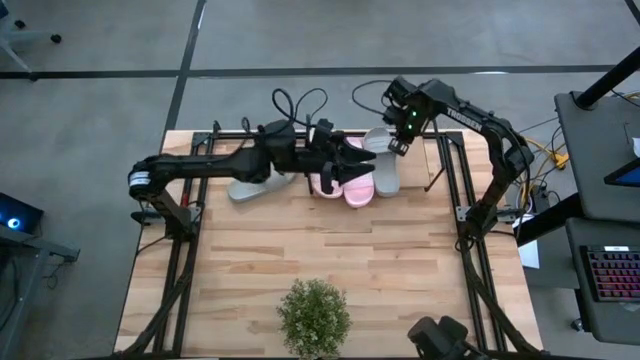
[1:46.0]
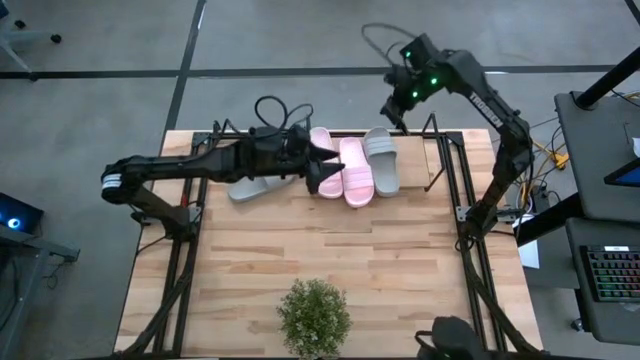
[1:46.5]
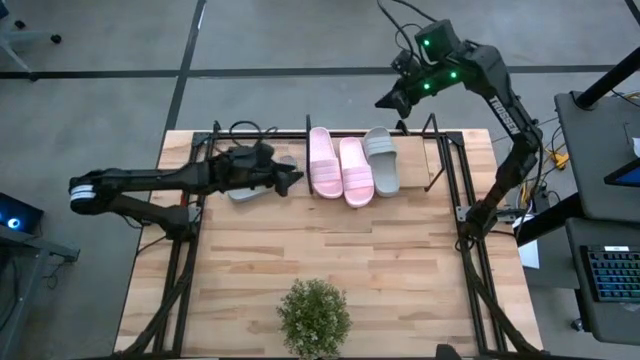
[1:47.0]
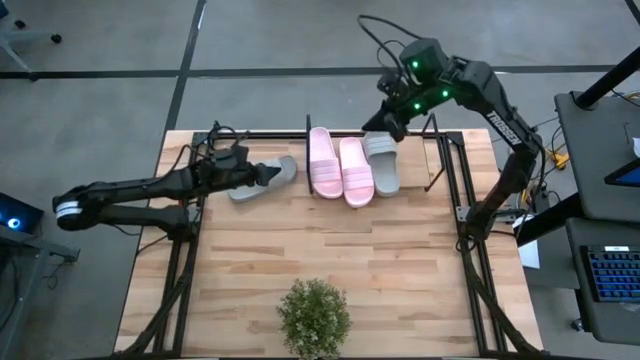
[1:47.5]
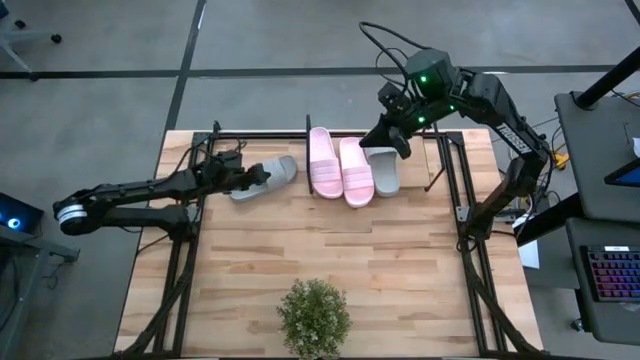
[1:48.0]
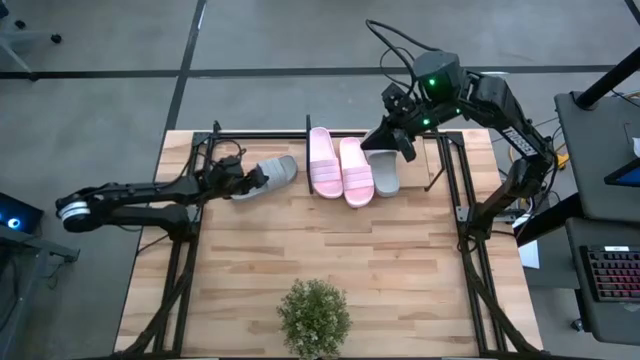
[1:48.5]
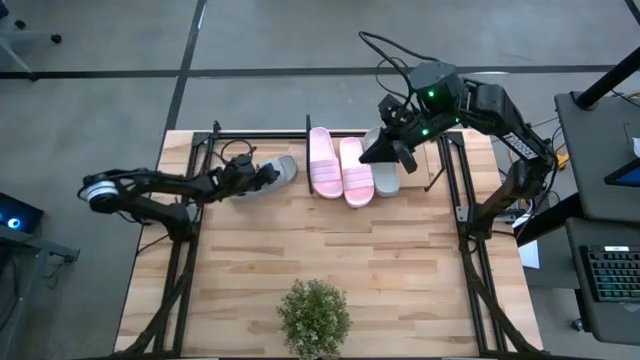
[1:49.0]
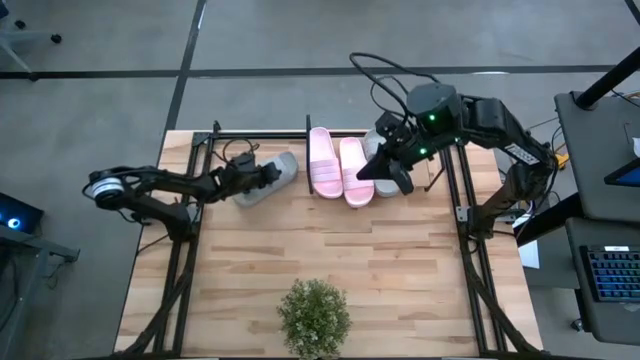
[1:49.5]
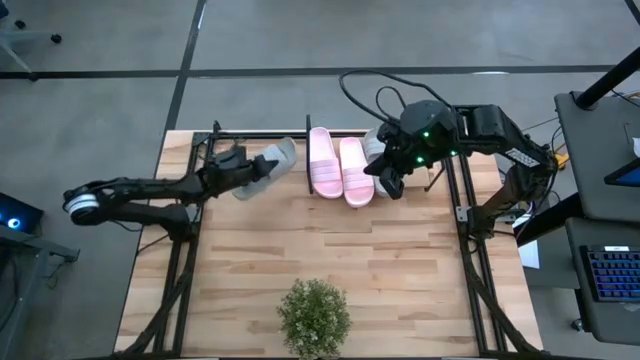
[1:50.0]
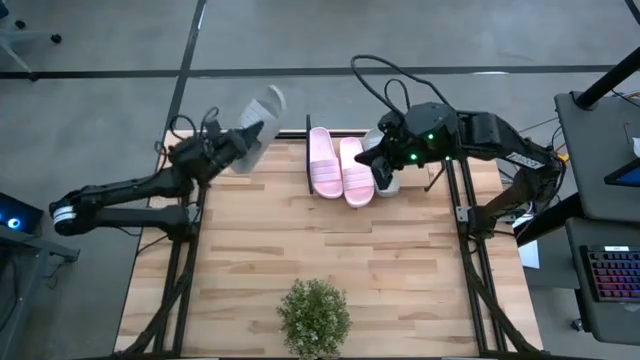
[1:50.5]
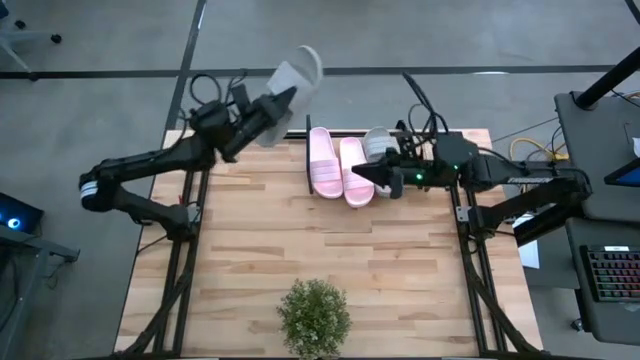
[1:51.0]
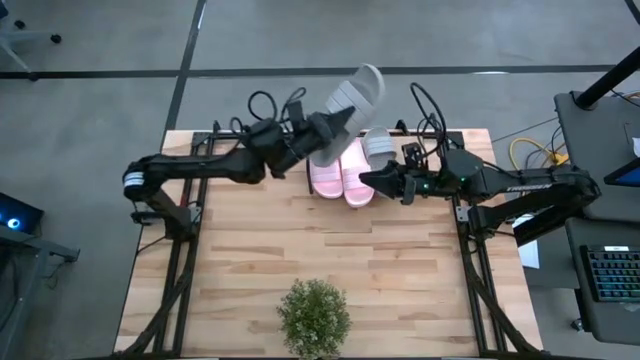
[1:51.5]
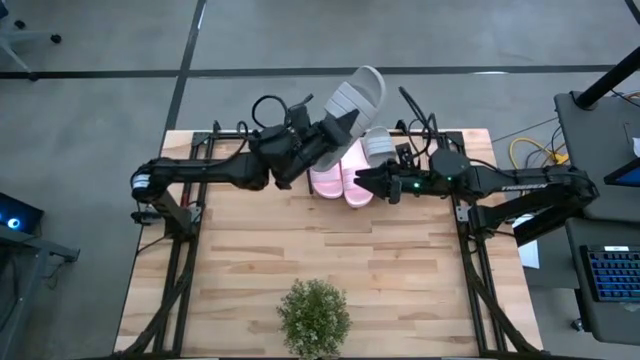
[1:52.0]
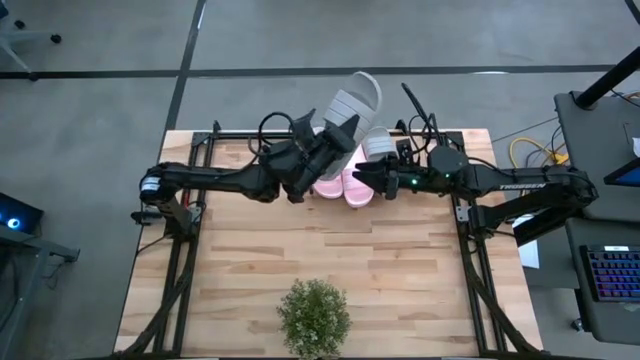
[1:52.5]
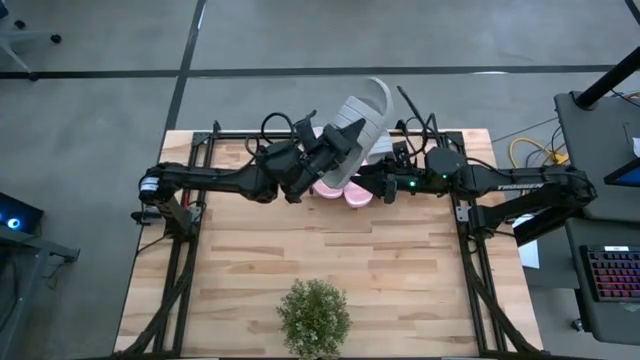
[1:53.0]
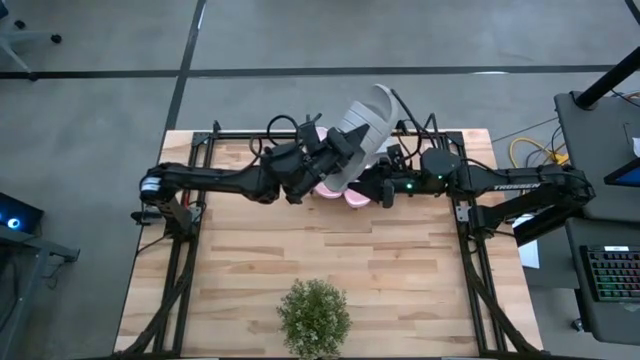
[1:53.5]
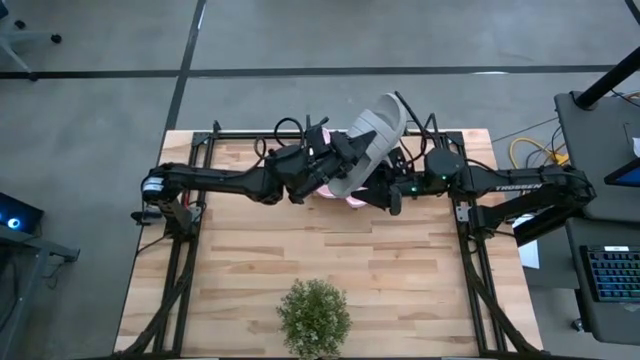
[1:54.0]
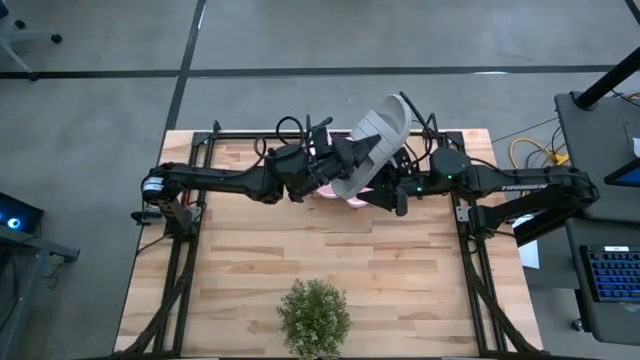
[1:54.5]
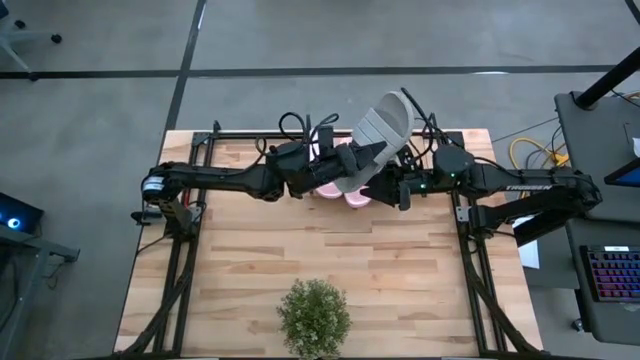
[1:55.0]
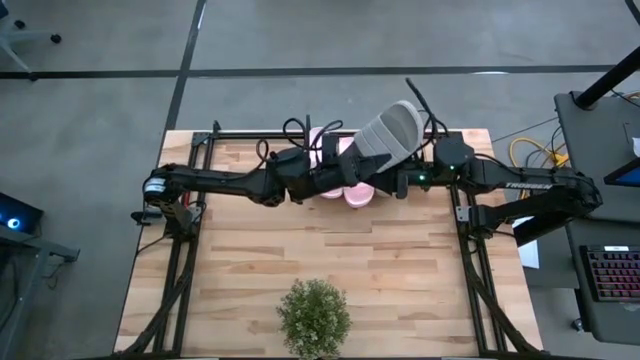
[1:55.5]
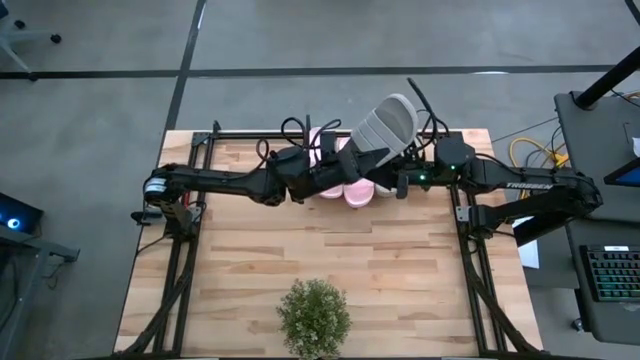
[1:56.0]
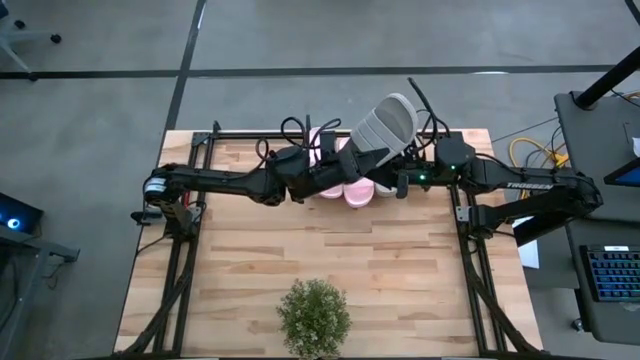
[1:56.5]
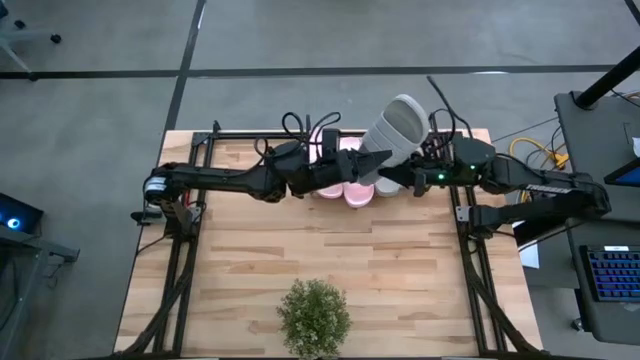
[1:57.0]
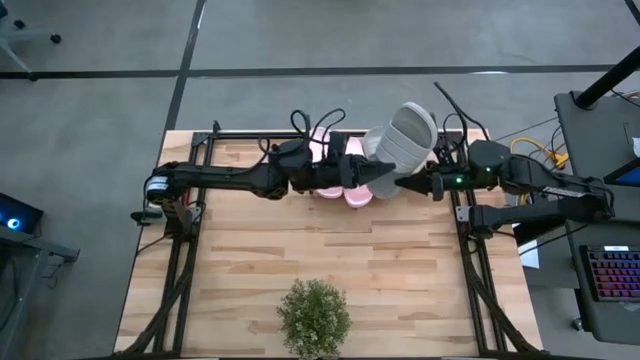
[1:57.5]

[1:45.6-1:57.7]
Task: Pick and place slides into the shelf
Put the gray slipper on the shelf

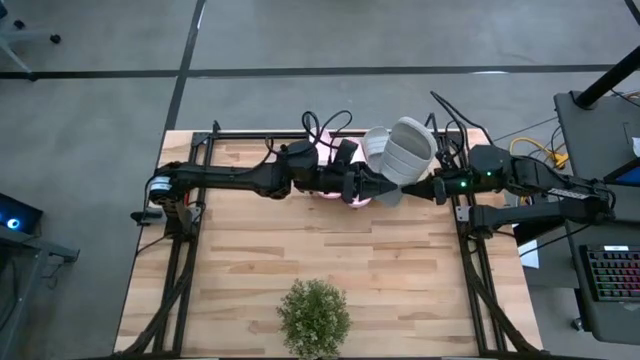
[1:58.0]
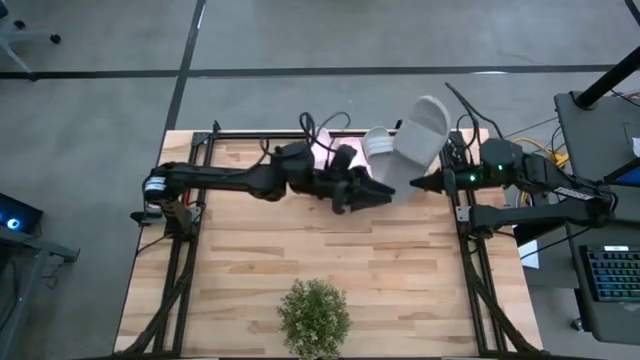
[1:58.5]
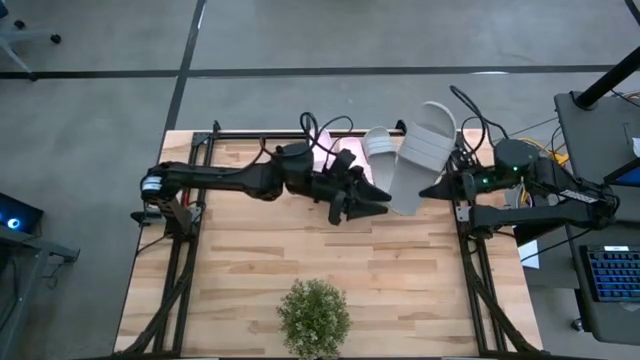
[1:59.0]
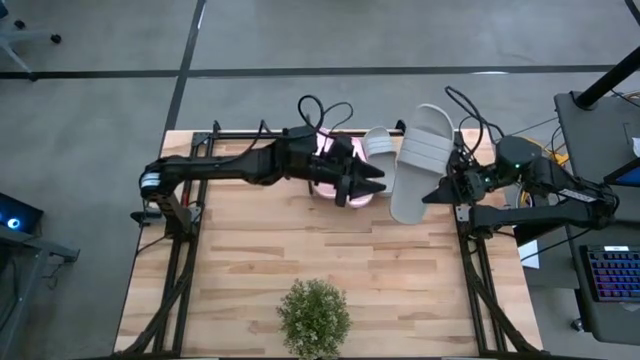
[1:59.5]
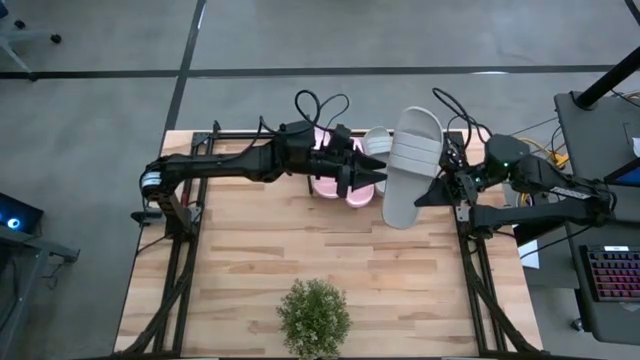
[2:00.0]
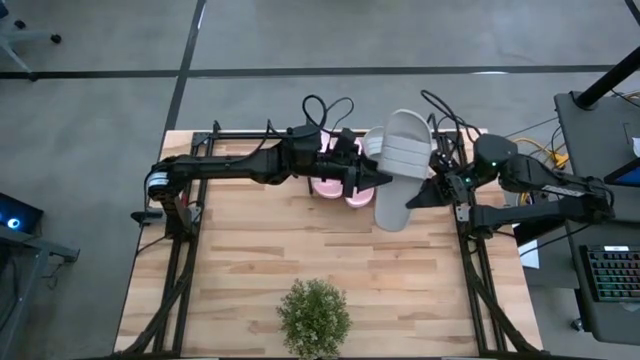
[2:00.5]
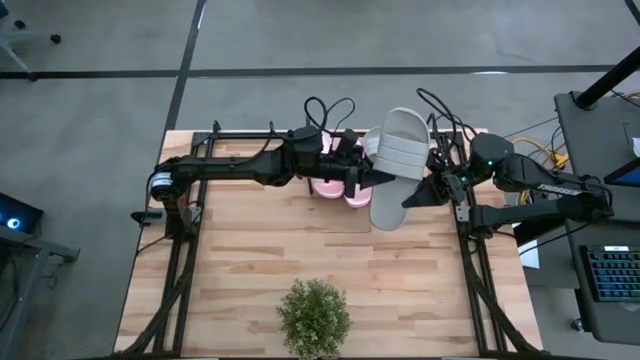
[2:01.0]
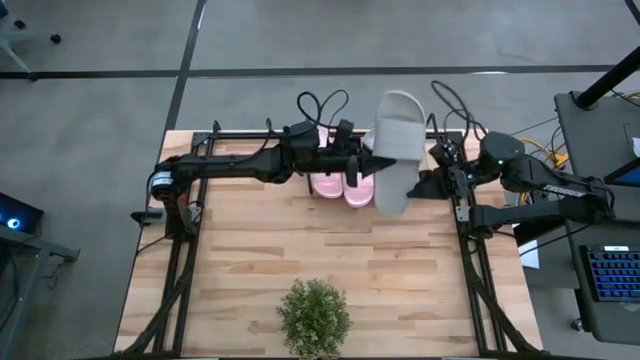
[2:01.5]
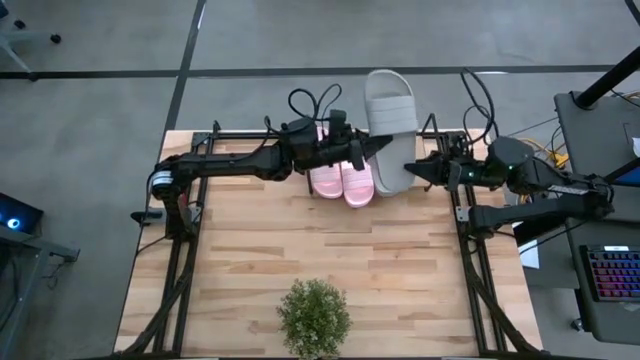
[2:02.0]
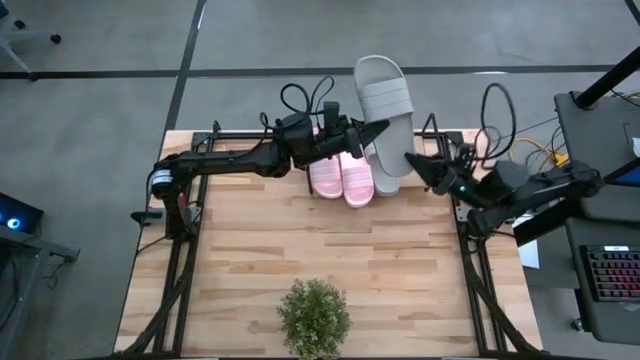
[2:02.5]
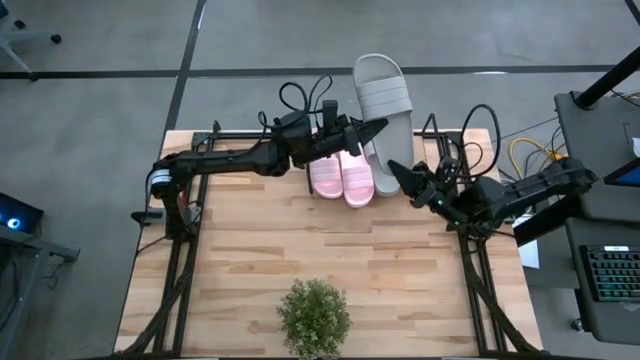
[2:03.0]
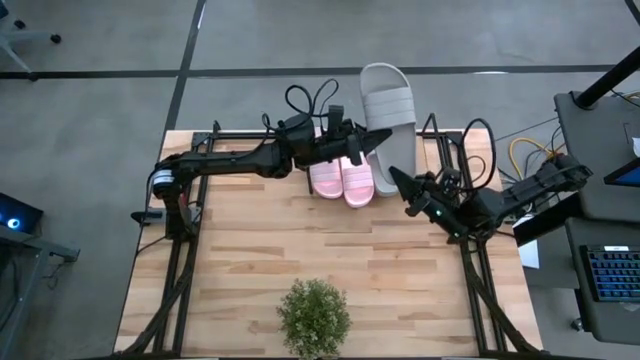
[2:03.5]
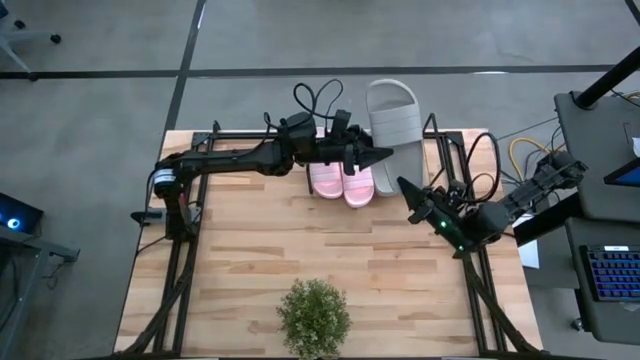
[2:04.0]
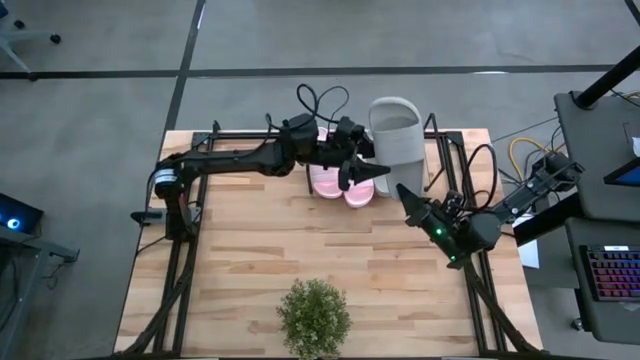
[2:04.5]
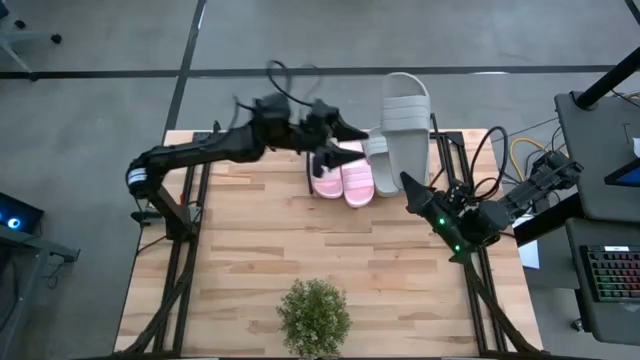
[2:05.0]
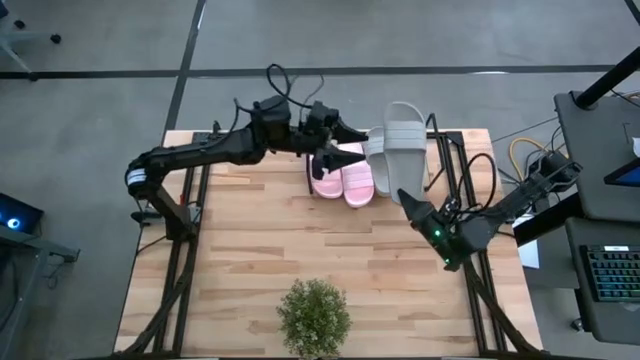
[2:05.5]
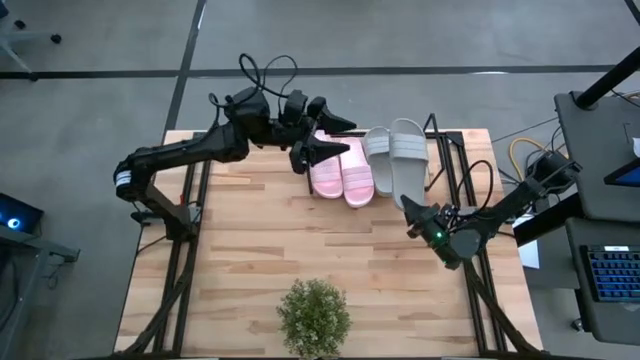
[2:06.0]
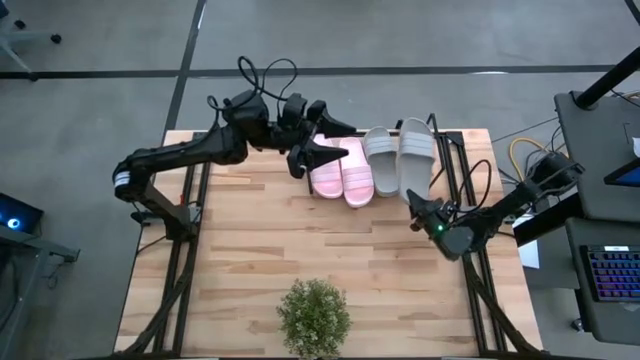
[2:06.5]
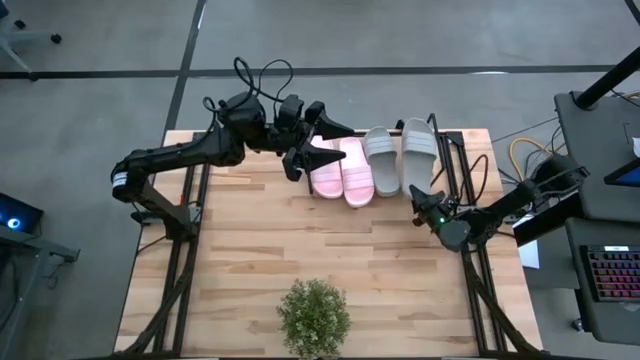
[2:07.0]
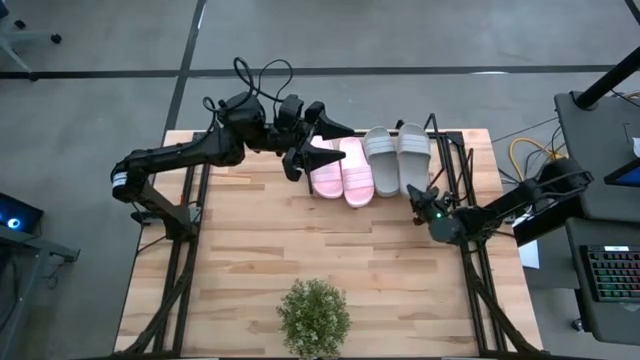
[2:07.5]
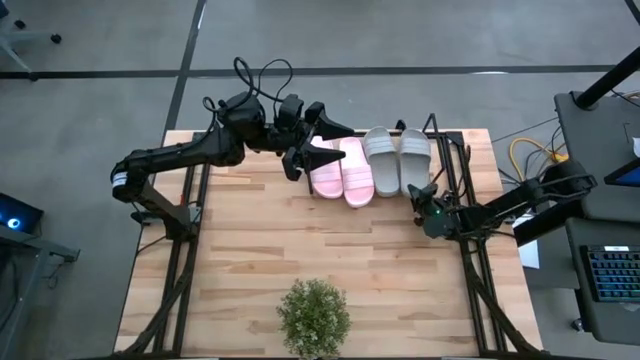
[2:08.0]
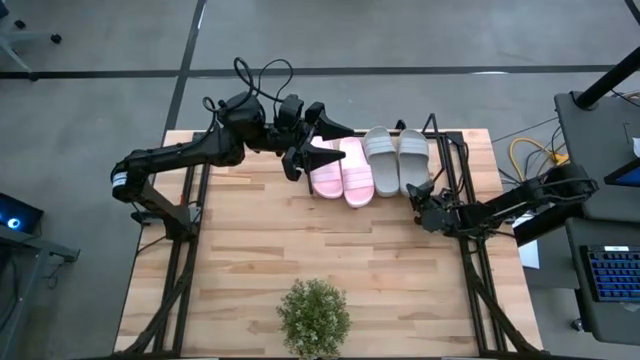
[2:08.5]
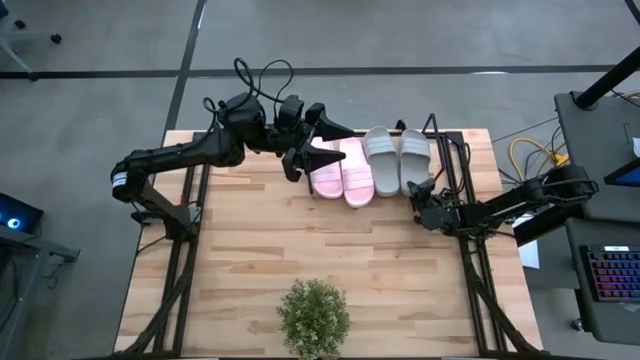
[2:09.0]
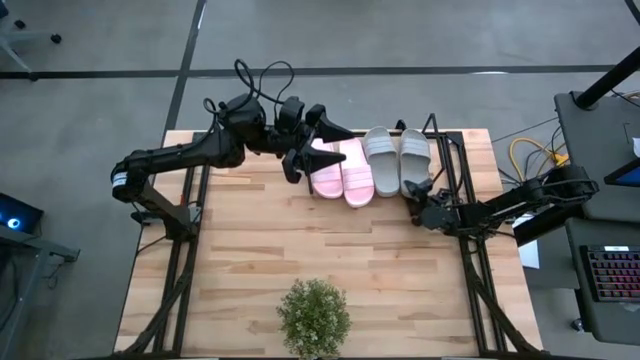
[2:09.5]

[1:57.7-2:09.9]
Put the gray slipper on the shelf
